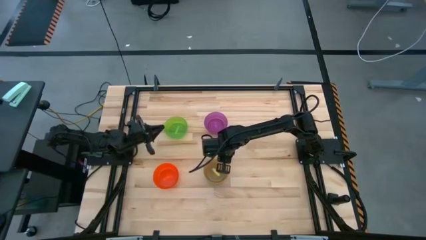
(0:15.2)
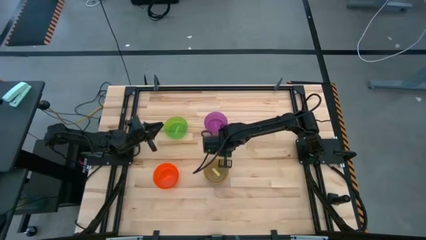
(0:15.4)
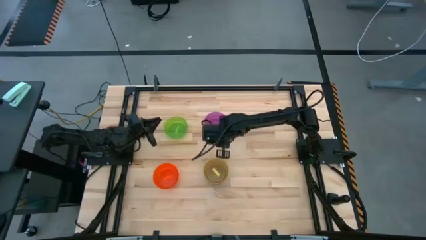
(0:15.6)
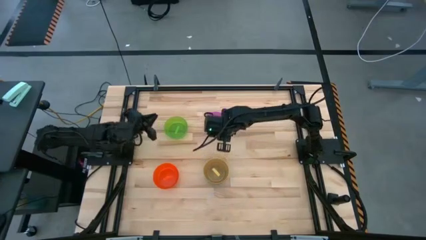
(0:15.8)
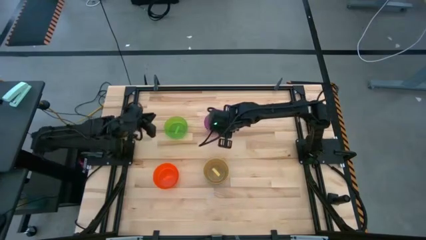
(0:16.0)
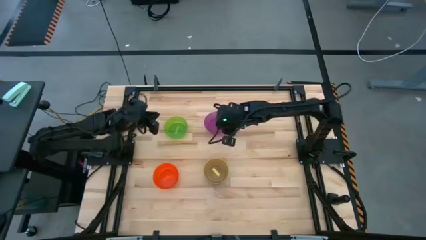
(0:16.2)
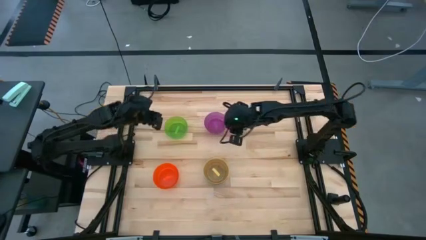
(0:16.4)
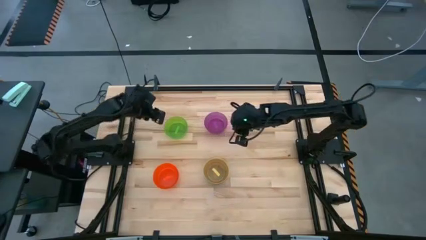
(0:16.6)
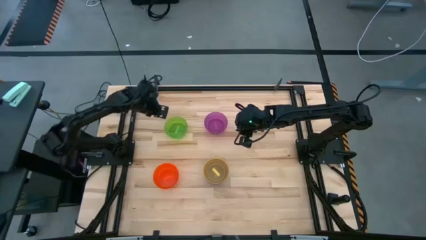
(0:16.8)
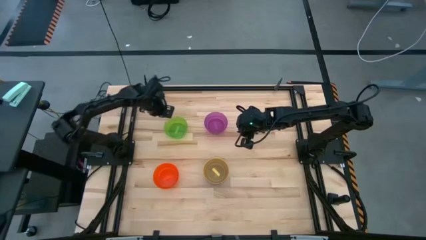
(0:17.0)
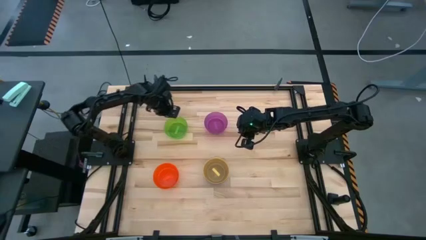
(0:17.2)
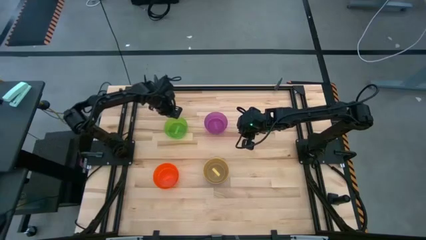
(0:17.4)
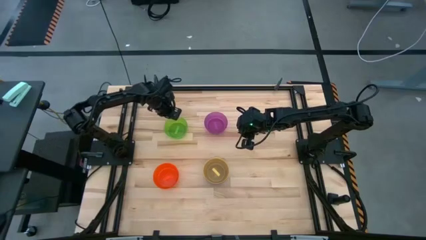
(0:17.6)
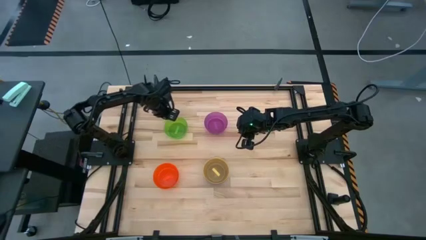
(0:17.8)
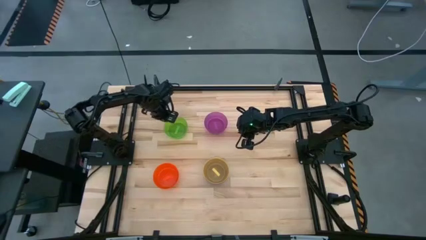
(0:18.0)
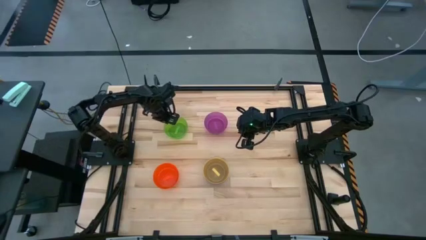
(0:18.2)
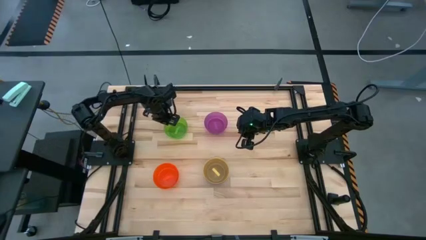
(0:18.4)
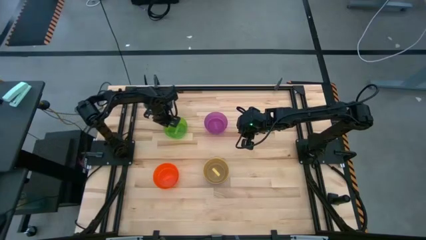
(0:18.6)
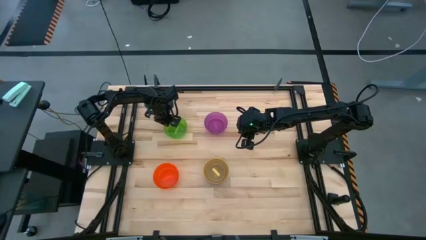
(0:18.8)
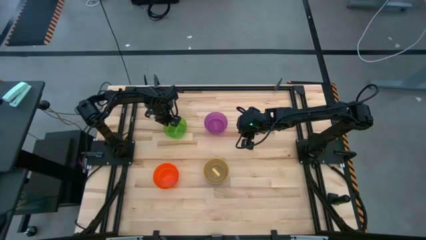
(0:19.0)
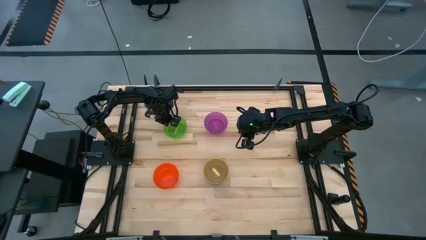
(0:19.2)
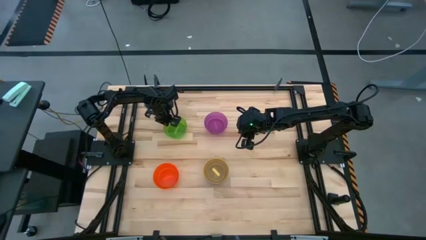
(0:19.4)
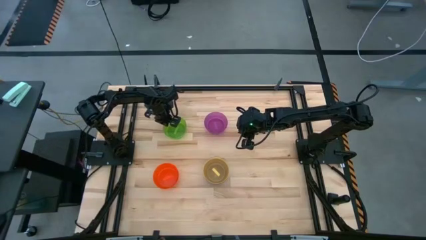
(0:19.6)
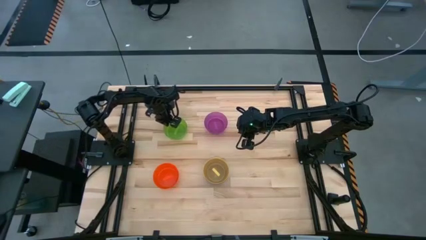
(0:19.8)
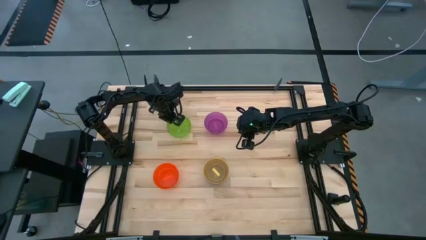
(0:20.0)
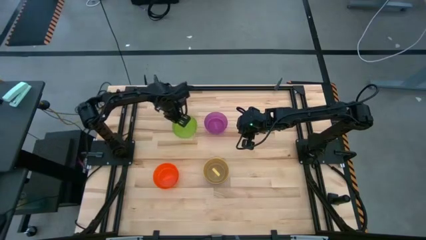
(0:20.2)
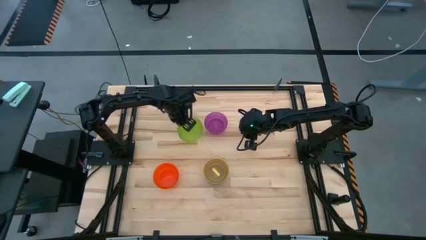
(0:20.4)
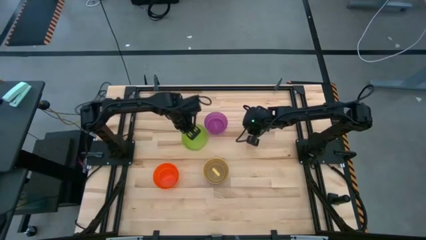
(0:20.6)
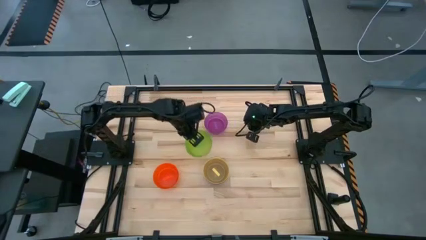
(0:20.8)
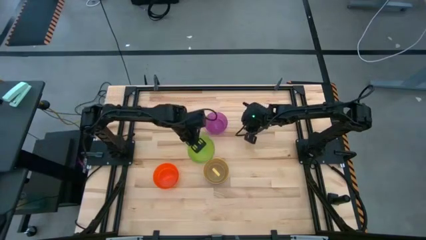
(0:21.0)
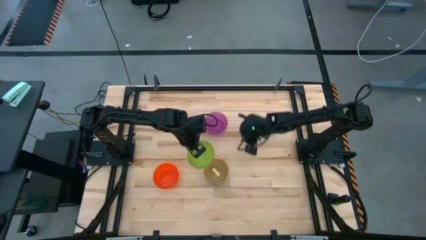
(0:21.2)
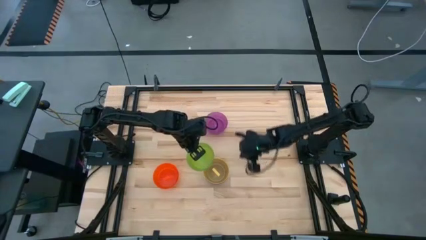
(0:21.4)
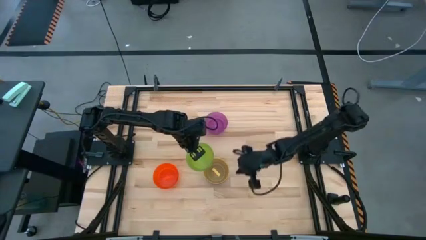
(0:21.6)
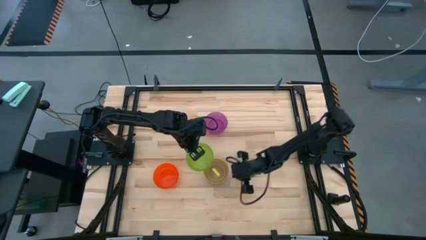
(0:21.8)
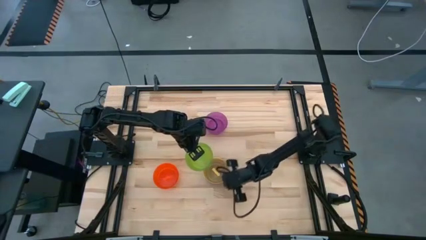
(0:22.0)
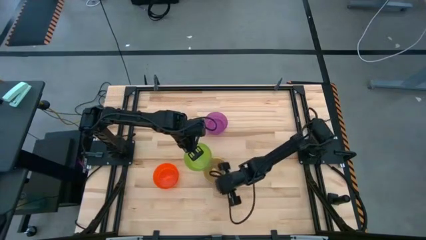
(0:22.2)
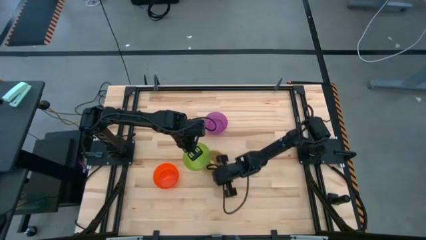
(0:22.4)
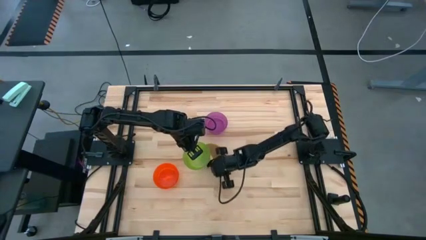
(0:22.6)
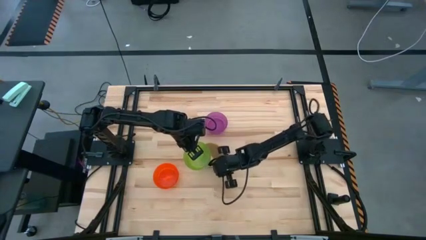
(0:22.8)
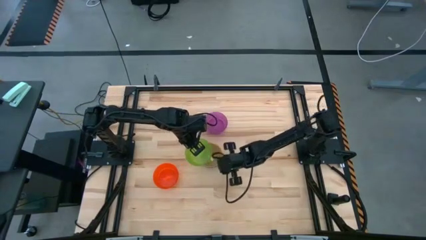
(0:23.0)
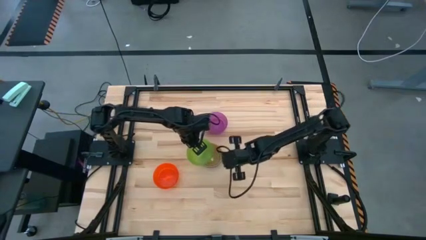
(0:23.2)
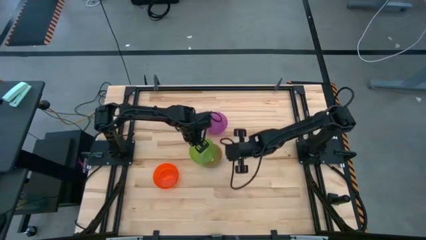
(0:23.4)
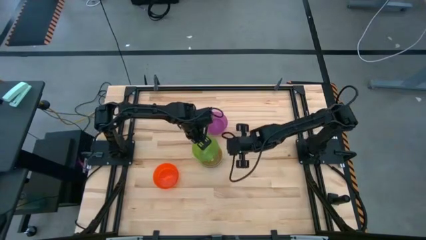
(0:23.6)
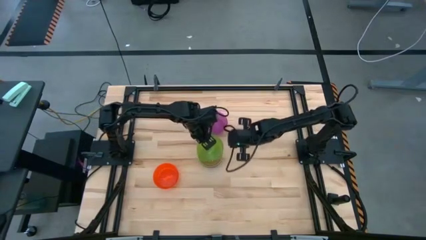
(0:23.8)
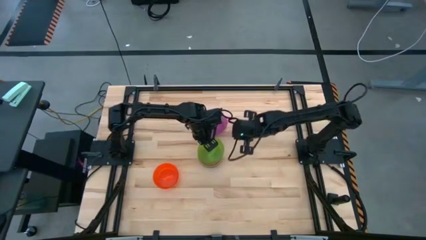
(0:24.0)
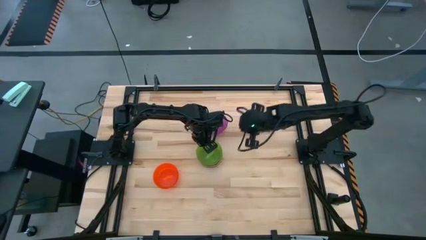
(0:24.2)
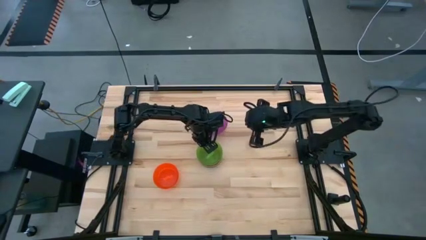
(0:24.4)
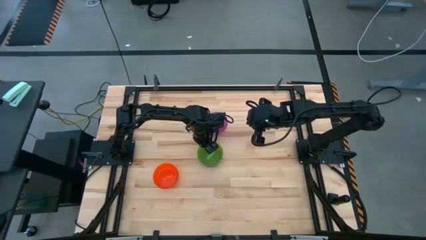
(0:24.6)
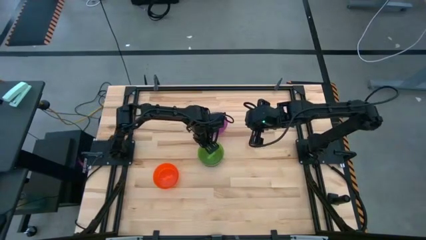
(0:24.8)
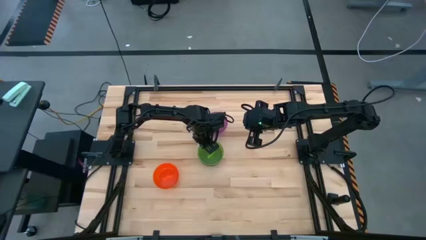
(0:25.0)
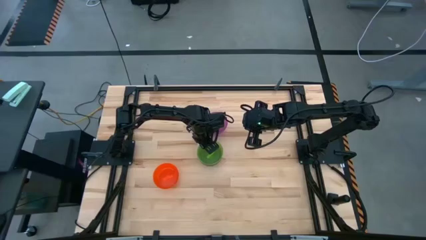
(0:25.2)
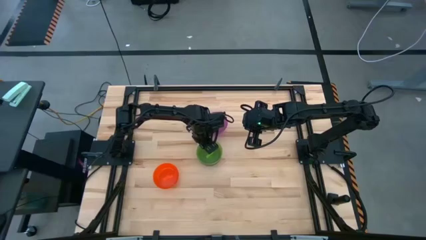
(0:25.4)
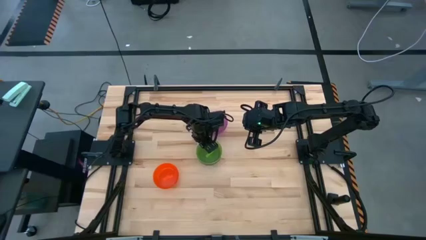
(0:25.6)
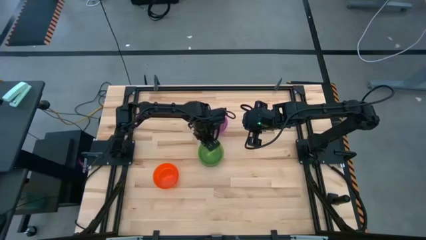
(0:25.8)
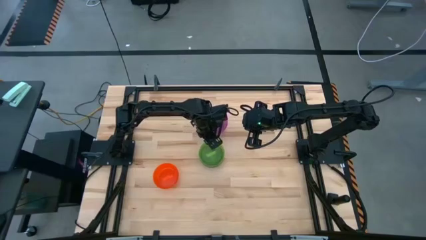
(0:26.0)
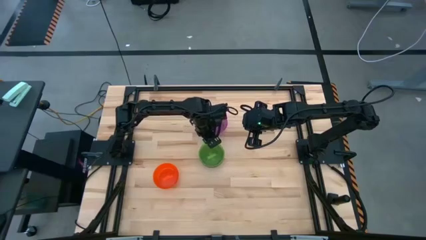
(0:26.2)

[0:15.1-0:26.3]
Task: Nest bowls inside each other
Stack the green bowl on top of the yellow bowl

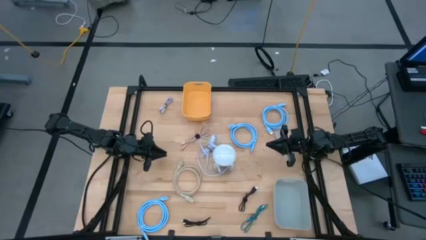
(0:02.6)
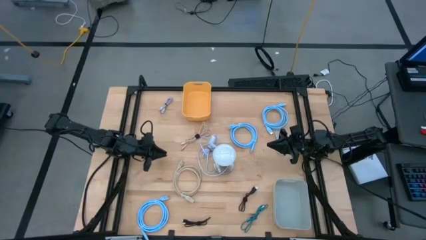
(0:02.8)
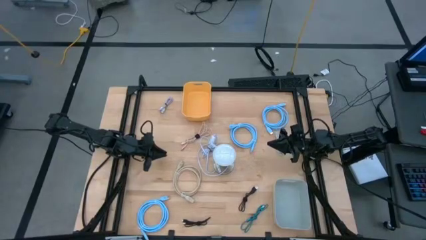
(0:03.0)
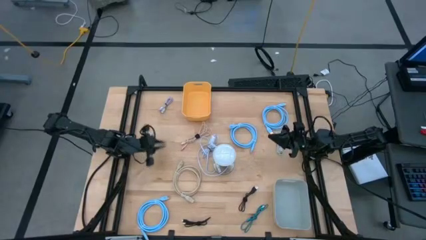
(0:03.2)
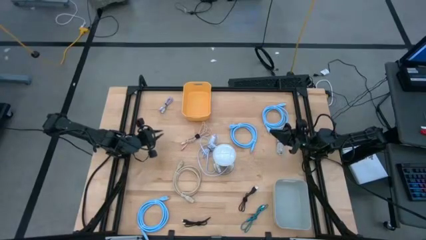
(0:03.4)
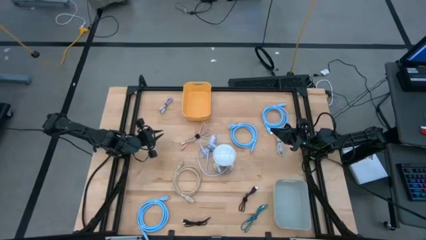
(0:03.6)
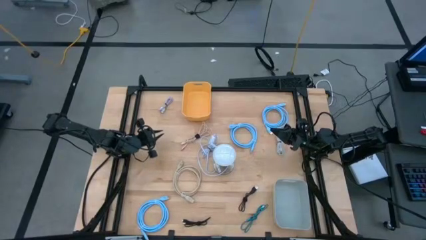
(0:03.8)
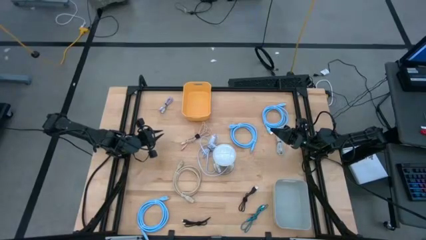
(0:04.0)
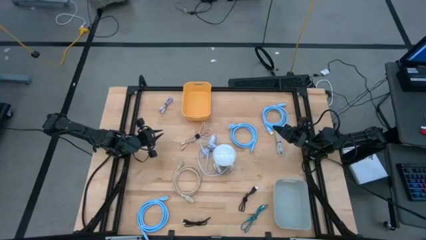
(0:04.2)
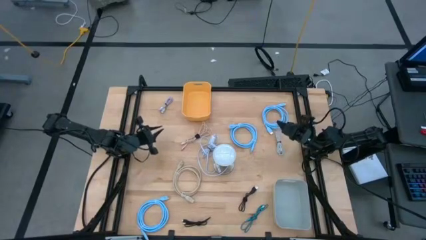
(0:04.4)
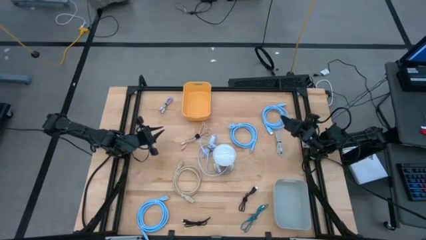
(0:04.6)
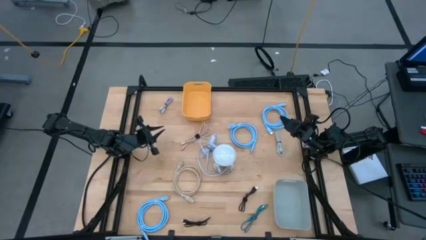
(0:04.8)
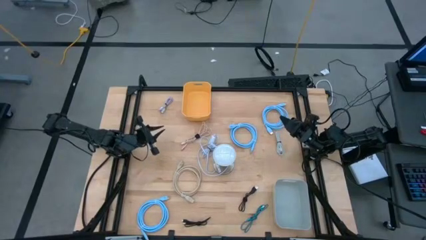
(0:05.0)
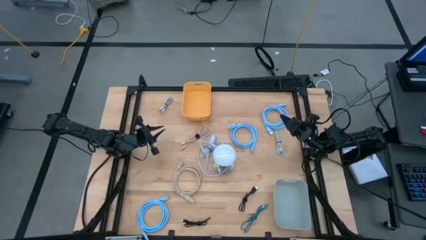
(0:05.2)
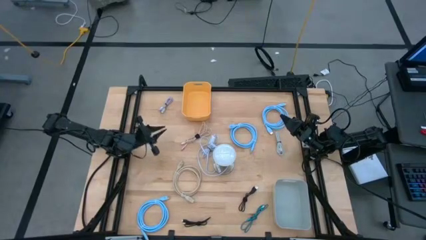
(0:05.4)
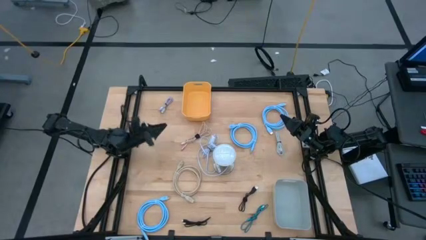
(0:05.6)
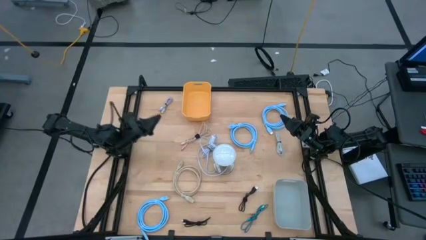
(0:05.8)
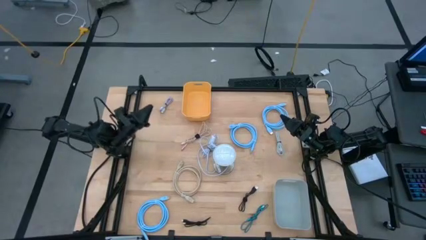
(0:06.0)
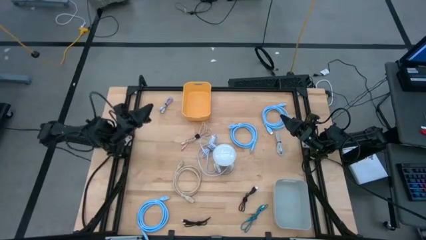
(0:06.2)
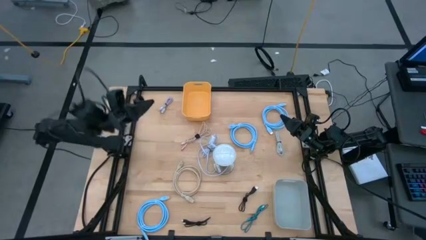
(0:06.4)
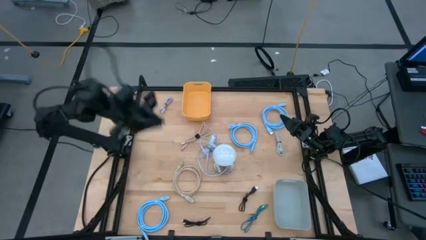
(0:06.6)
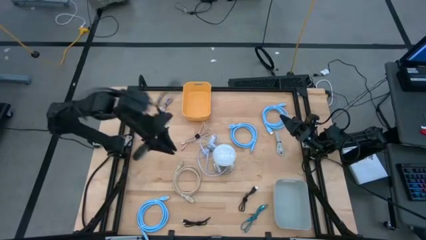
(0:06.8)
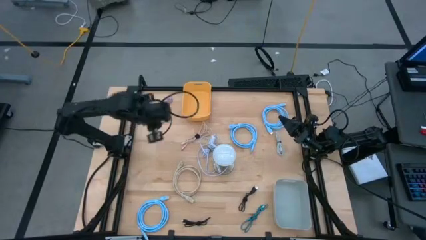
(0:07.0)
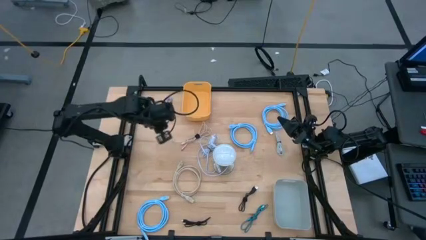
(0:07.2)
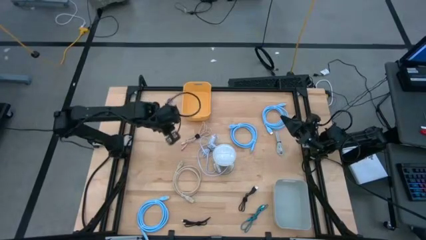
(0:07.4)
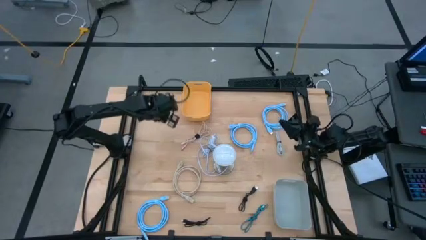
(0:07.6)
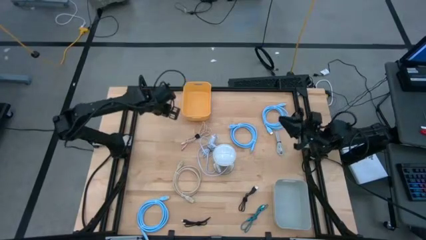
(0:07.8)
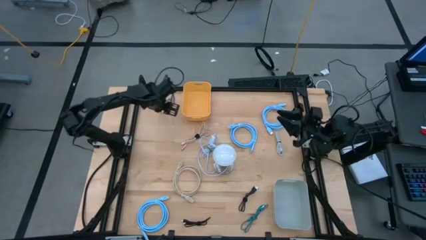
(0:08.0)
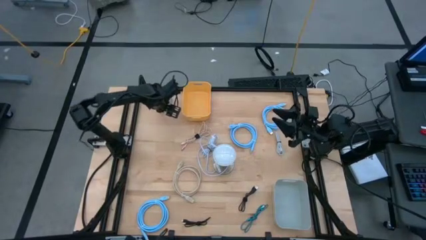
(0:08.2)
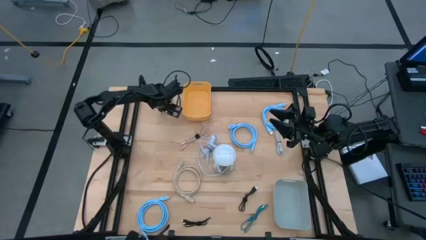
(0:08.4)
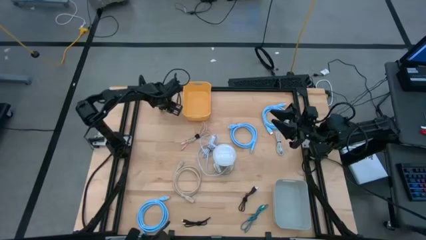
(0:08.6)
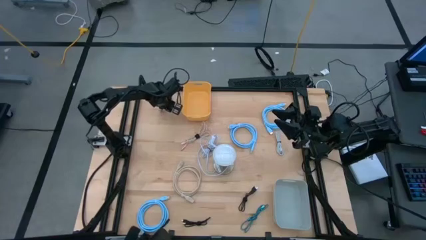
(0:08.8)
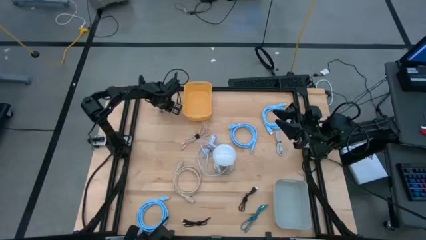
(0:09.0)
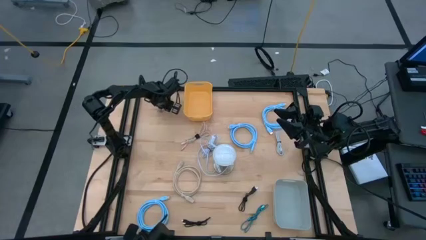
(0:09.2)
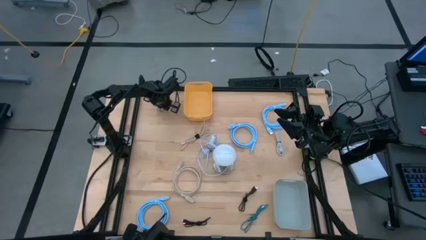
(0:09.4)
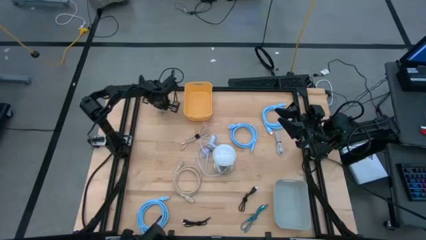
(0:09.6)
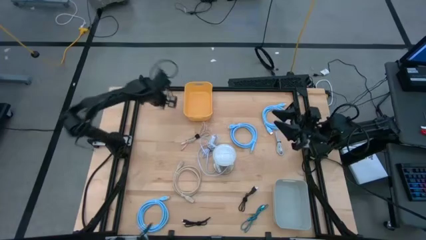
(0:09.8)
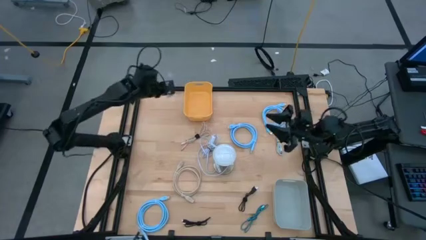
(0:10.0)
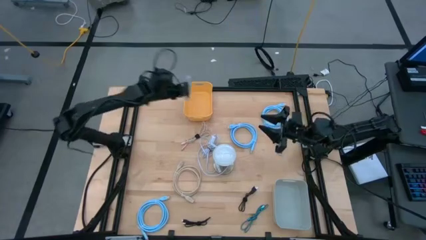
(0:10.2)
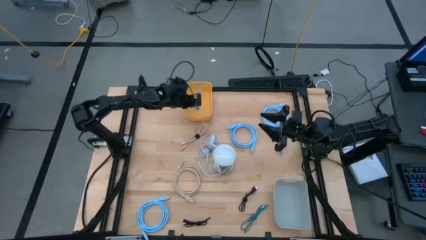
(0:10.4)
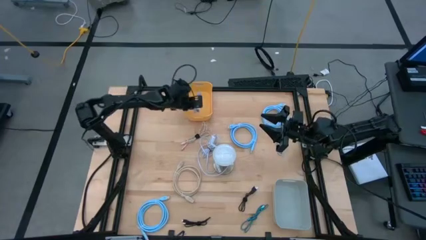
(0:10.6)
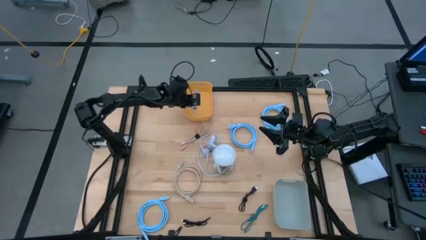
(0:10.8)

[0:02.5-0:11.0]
Task: Pick & Place USB Port
Put the purple charger cable into the yellow bin
